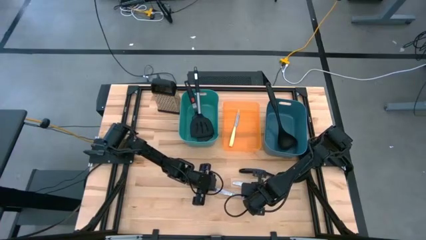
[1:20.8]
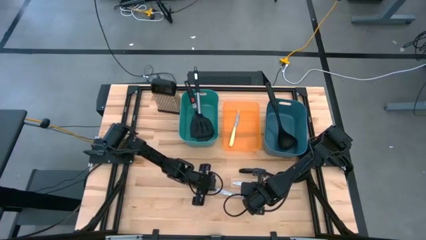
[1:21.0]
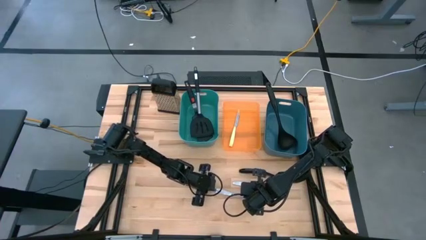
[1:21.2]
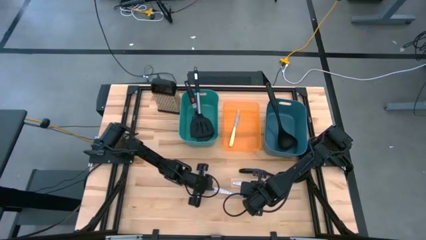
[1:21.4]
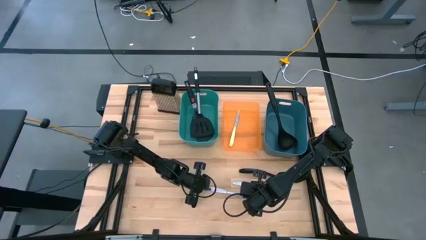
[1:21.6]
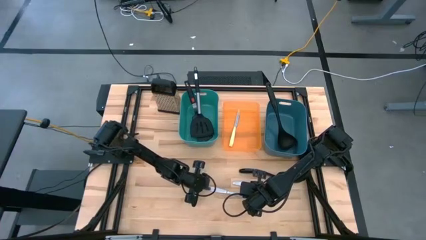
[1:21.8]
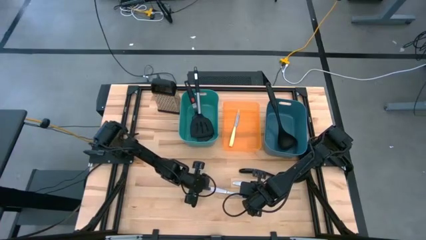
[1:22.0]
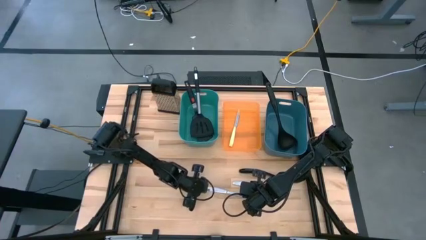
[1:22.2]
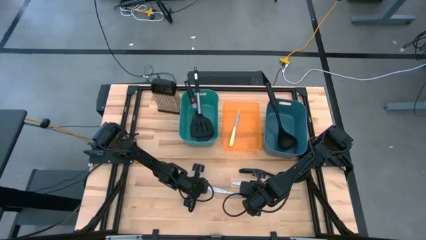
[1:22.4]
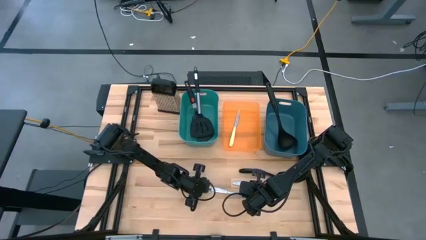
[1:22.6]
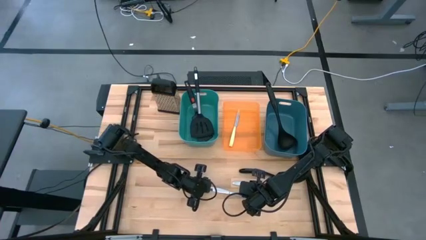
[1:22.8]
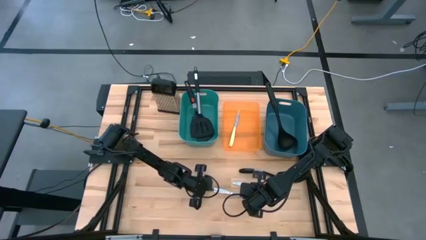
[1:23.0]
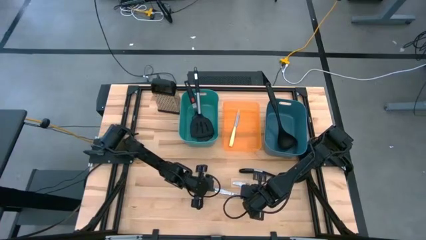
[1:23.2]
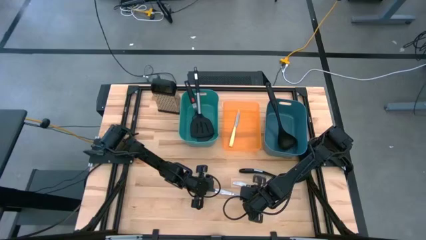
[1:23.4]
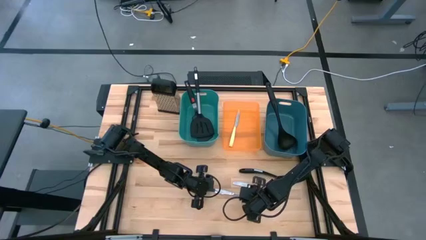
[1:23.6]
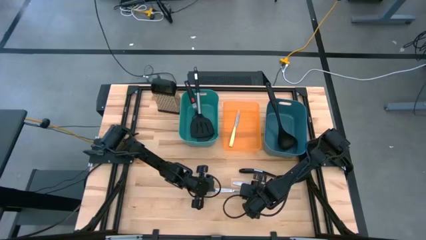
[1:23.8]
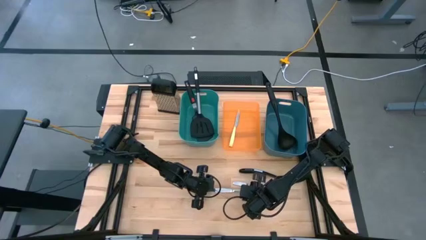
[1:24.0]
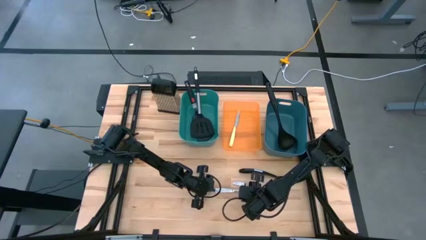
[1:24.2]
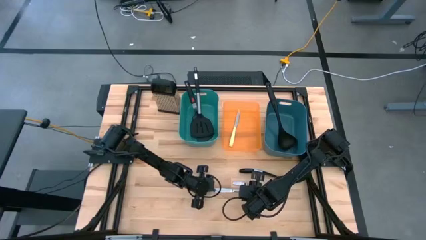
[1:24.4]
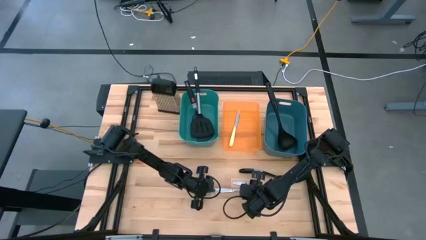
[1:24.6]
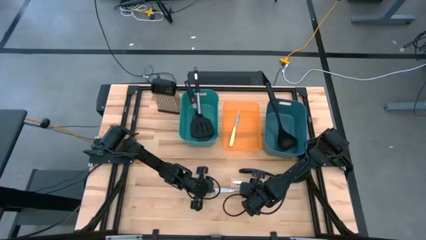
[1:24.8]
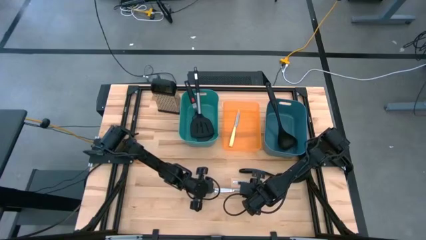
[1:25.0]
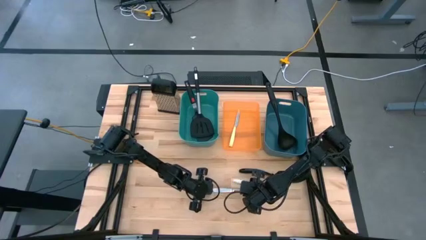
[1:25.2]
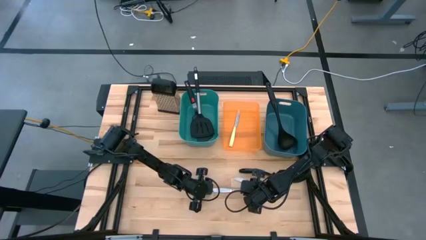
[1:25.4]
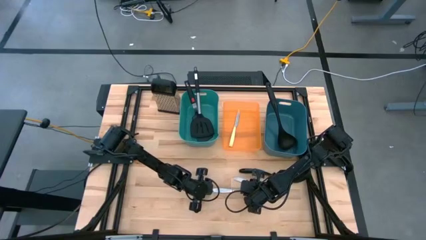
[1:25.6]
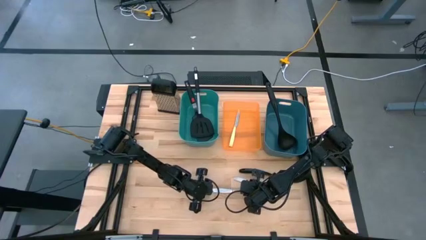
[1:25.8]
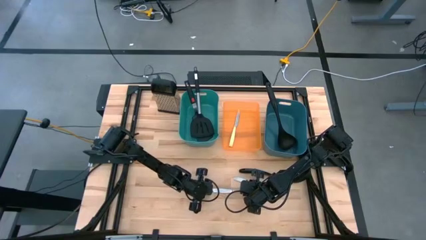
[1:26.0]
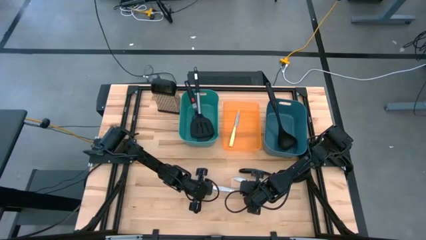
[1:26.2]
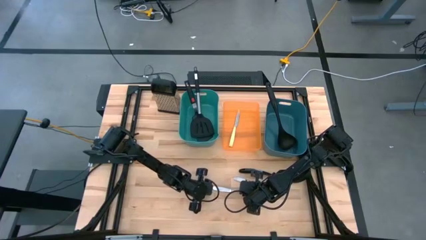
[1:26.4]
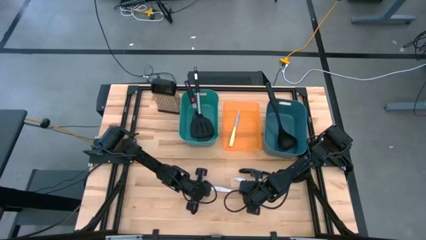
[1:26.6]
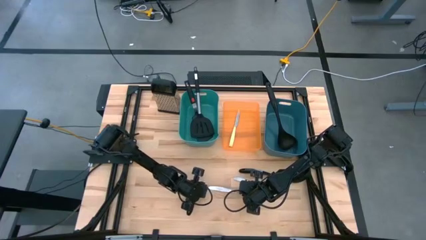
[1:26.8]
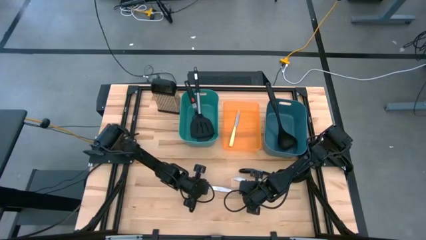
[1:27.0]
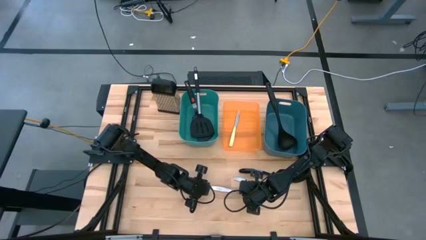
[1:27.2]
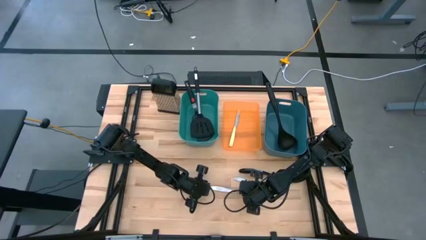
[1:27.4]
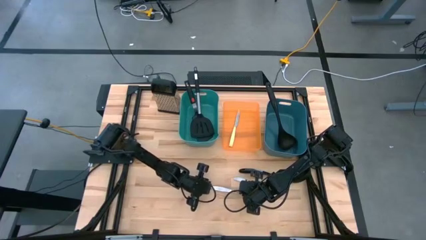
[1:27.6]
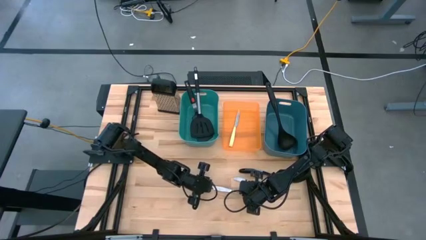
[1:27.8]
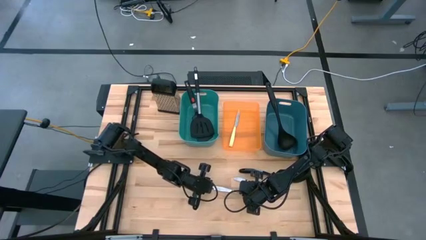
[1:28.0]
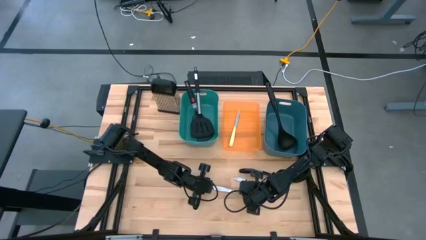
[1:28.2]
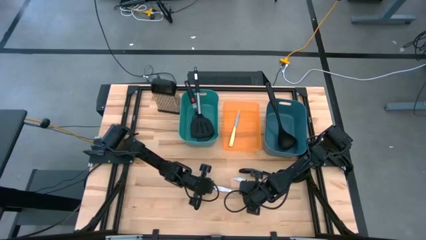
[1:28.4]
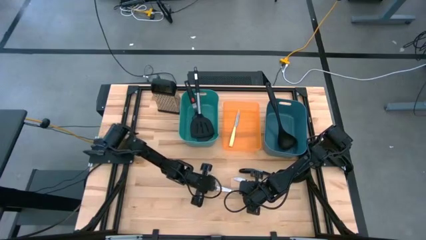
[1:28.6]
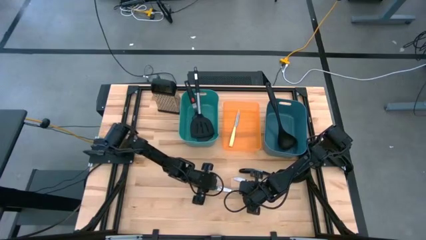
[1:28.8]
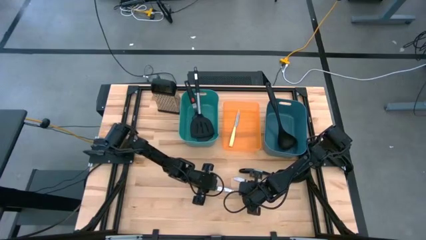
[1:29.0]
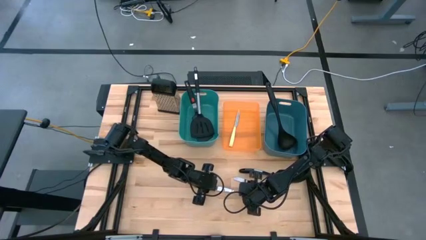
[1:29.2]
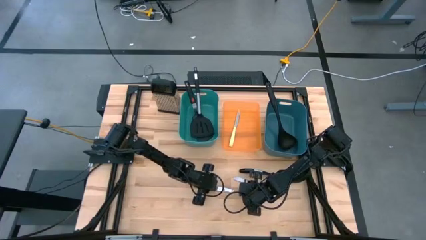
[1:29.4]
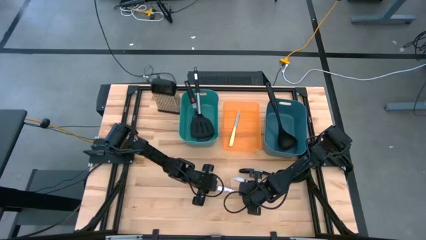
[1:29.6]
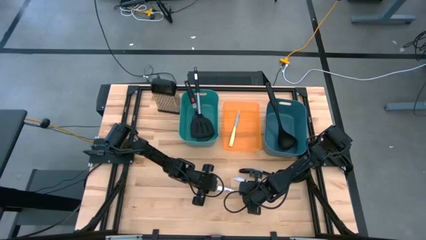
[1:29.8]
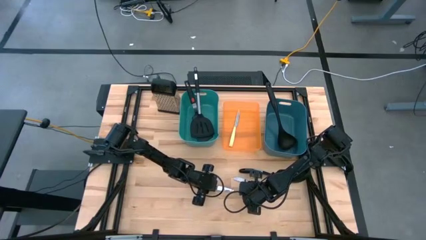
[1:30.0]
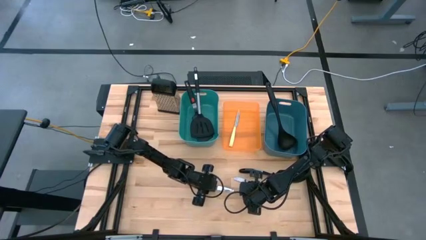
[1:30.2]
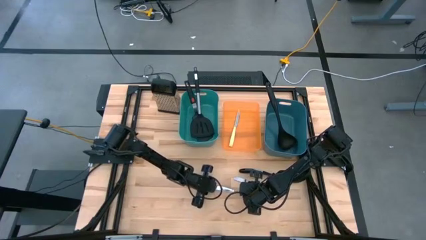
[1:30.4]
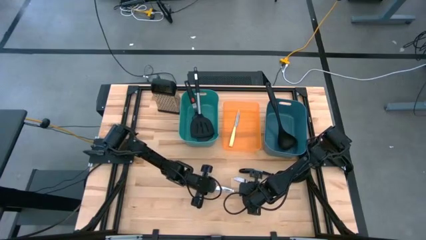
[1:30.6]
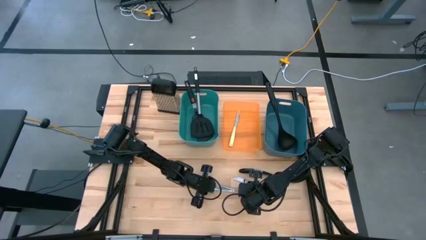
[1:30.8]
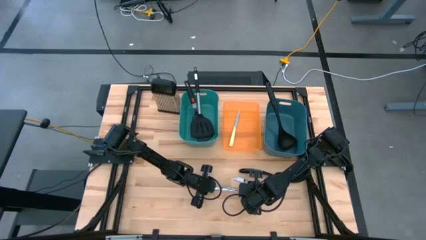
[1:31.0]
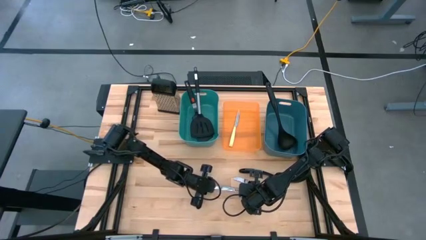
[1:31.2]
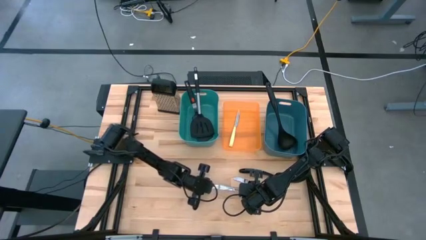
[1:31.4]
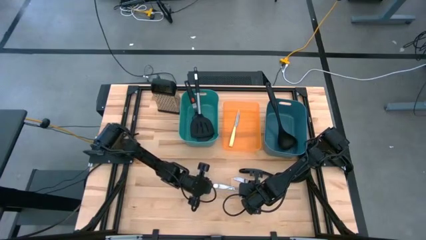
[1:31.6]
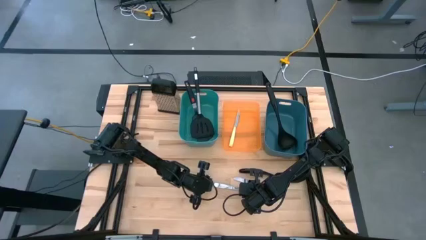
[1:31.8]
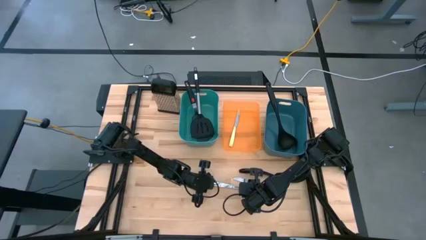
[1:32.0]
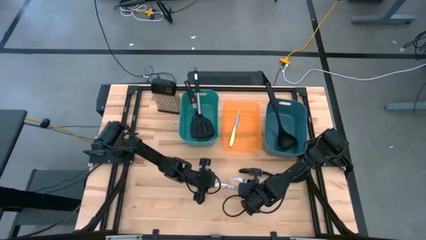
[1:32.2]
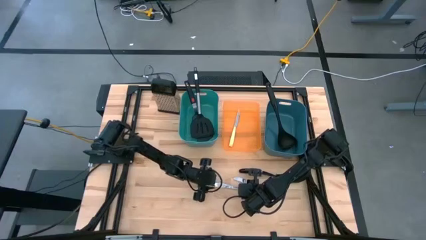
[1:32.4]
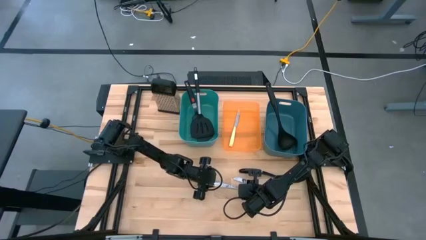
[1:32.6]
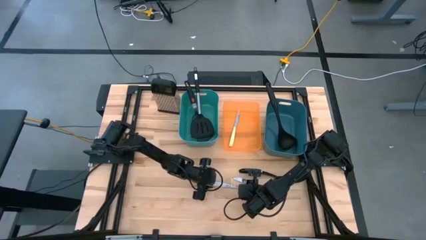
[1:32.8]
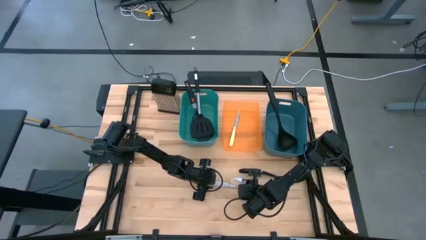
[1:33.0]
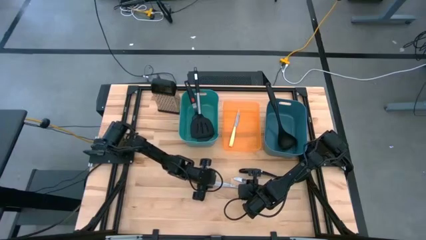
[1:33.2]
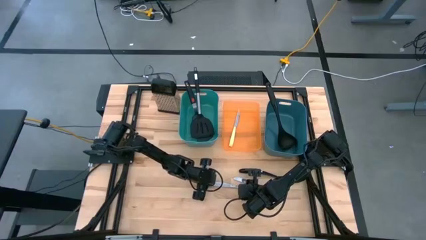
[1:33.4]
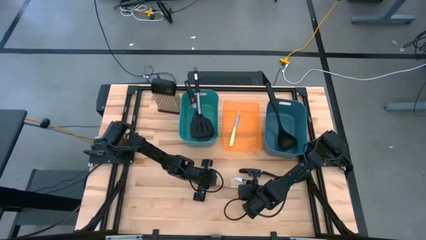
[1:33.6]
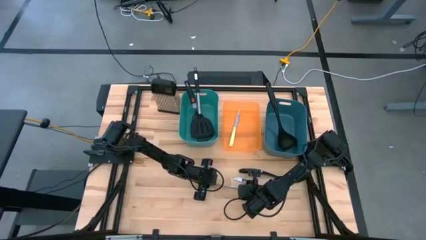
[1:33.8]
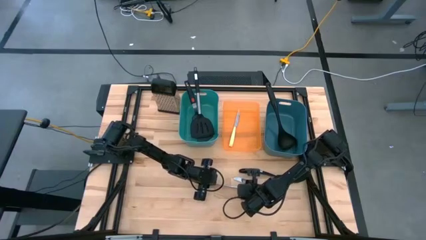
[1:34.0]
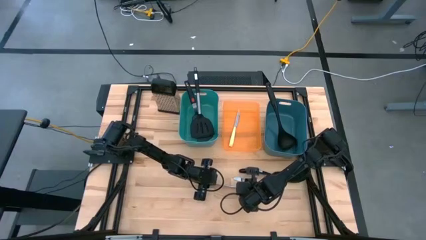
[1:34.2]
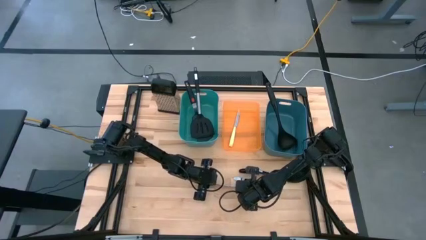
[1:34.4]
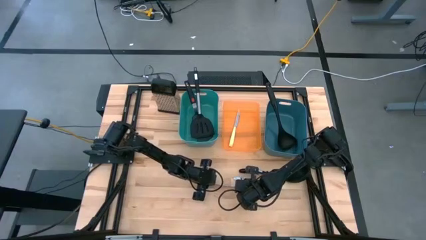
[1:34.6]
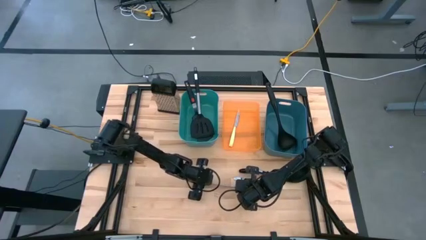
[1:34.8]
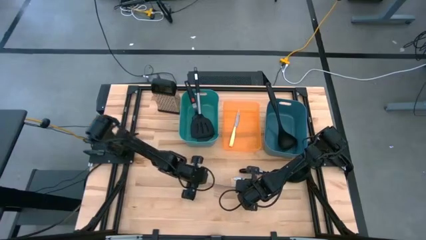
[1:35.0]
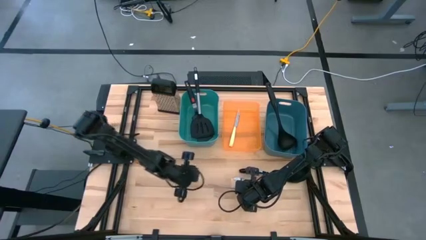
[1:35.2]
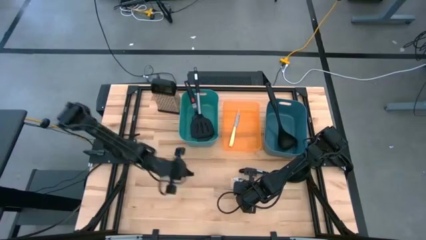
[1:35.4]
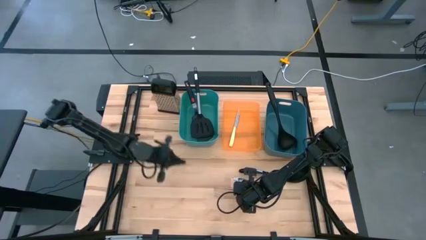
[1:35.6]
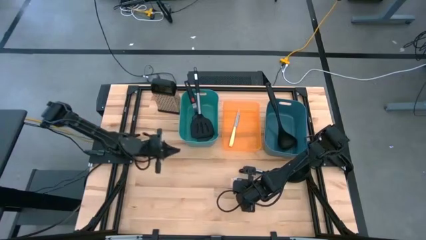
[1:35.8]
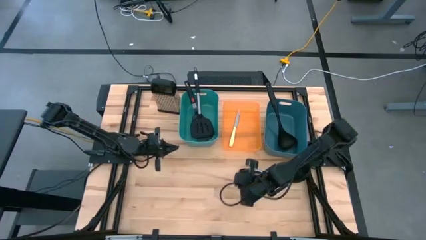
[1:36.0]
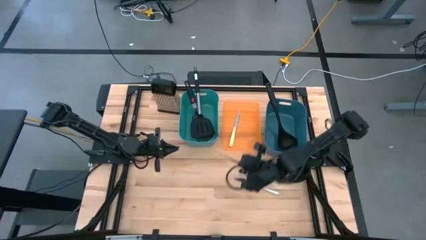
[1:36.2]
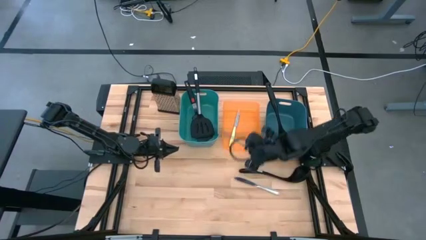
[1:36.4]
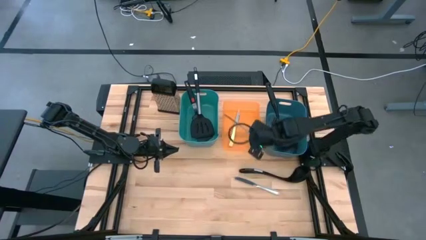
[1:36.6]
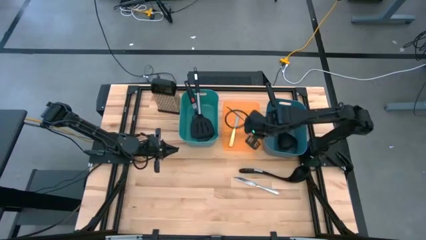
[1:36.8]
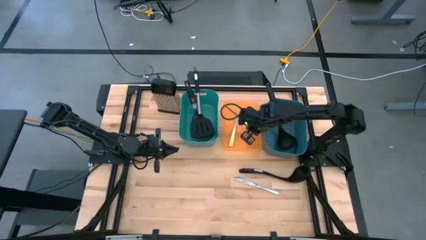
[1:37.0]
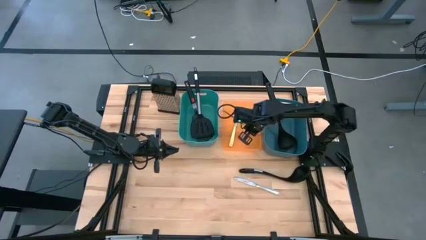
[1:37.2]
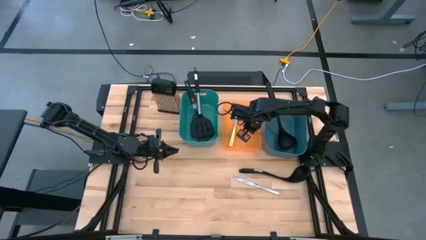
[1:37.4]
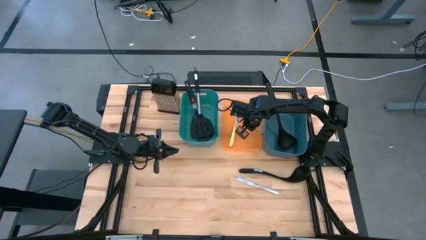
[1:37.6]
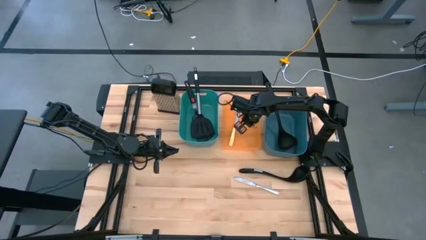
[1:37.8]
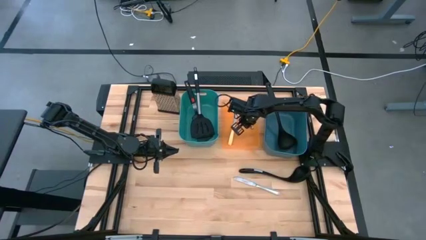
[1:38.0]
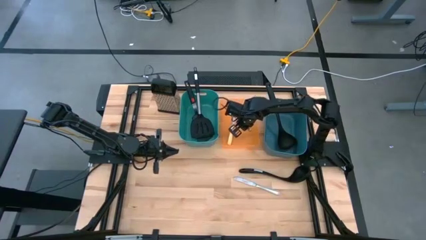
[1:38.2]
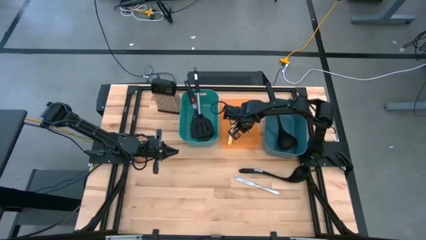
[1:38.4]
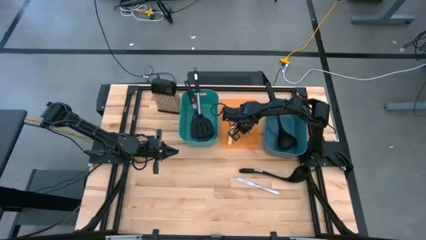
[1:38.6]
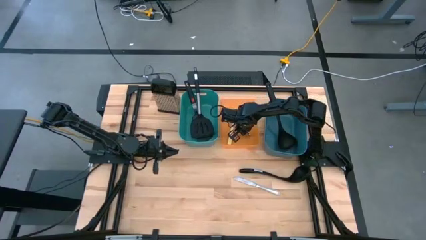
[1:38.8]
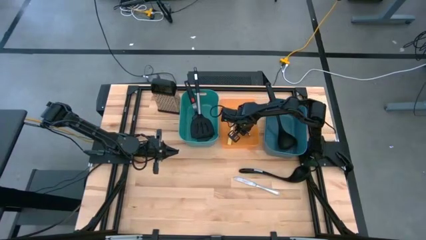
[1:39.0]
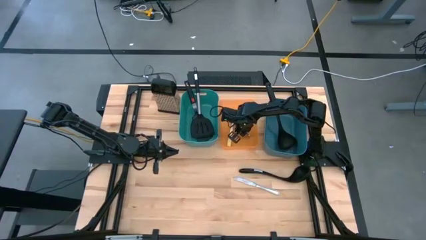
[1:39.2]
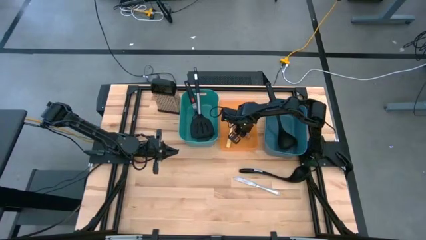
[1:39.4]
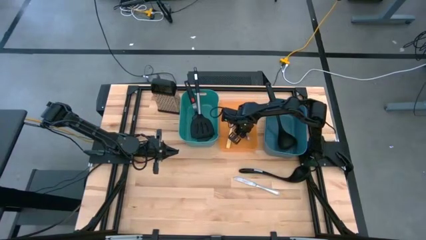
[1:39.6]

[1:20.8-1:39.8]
Task: Pick & Place Kitchen Items
Put the bottom silver table knife into the orange bin
